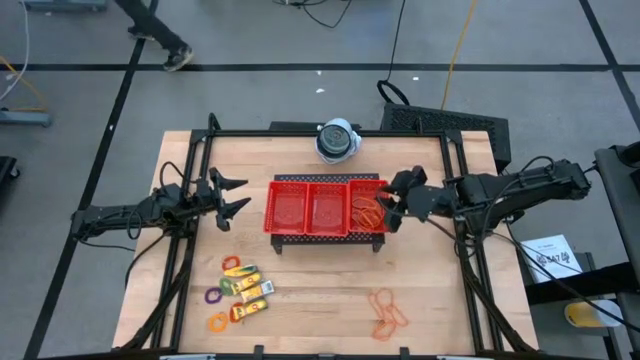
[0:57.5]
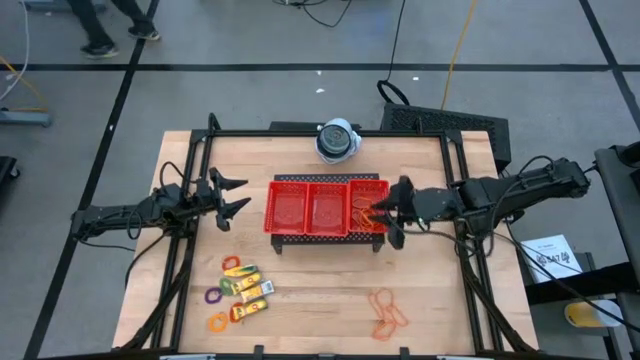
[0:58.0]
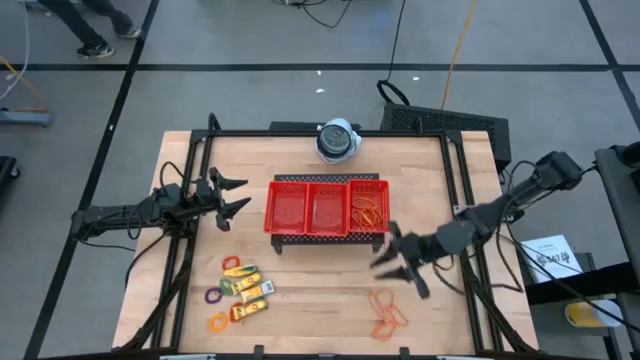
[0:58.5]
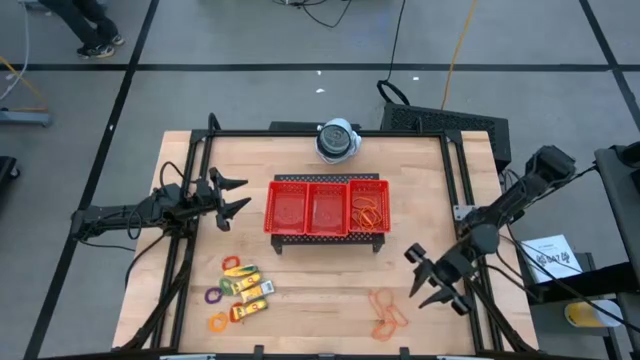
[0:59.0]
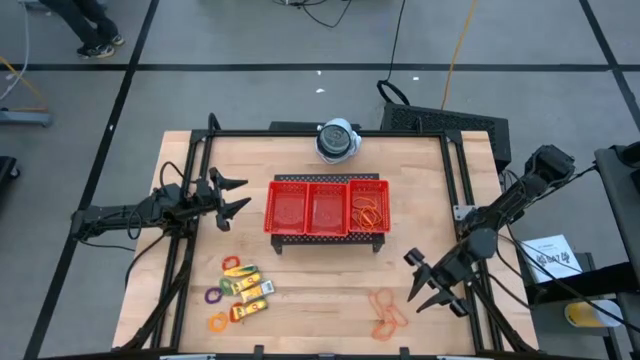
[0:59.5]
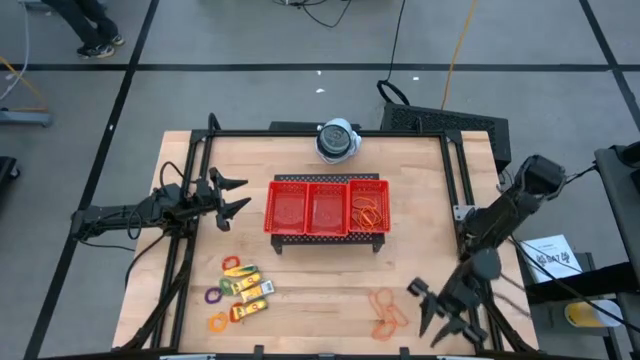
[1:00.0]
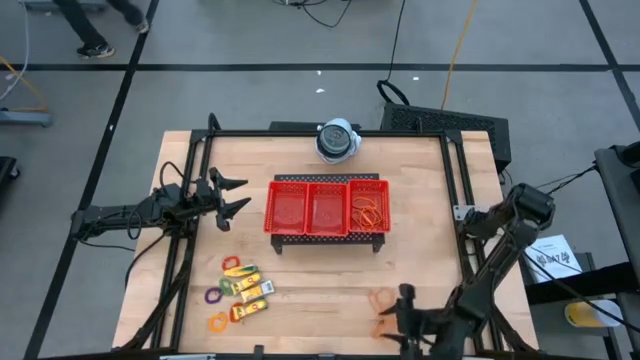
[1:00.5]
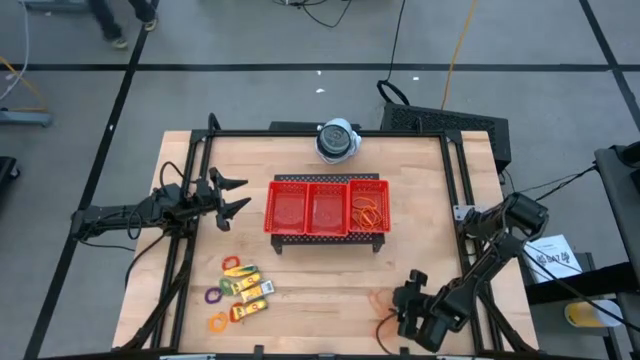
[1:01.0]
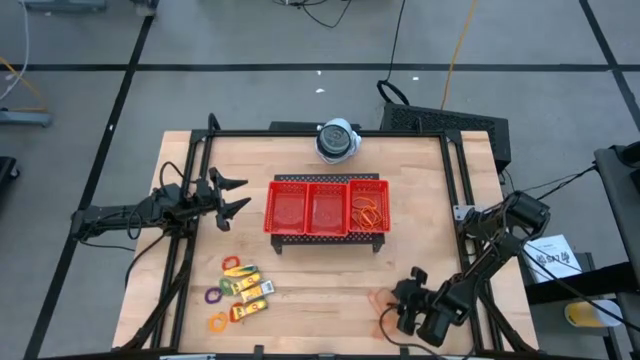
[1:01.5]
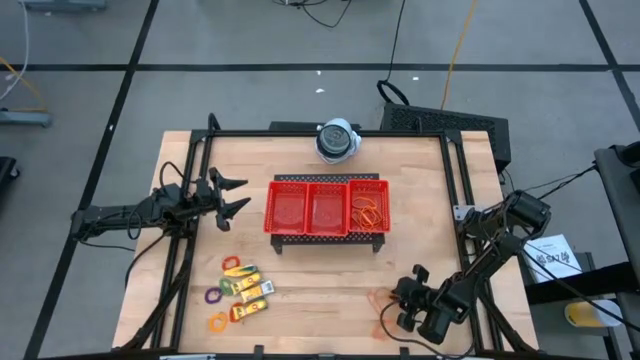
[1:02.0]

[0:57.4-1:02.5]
Task: Pick & Place Office Desk Supplies
Put the orange rubber band into the right red bin

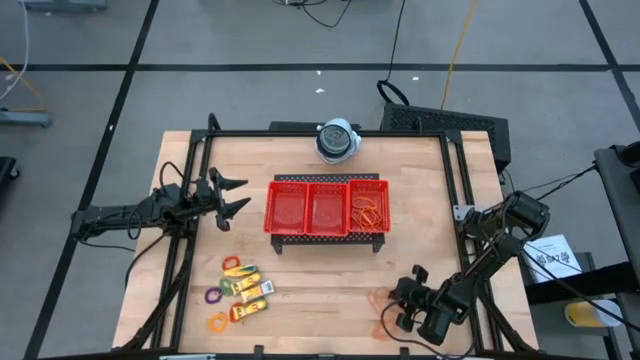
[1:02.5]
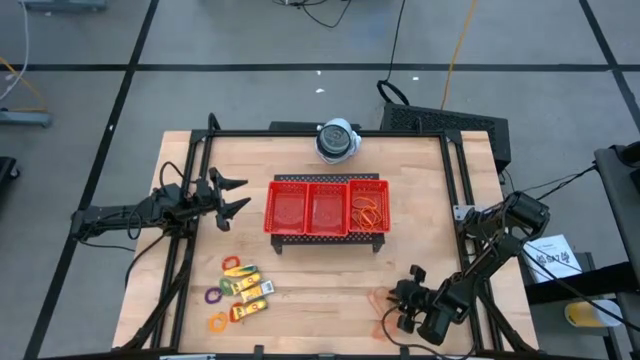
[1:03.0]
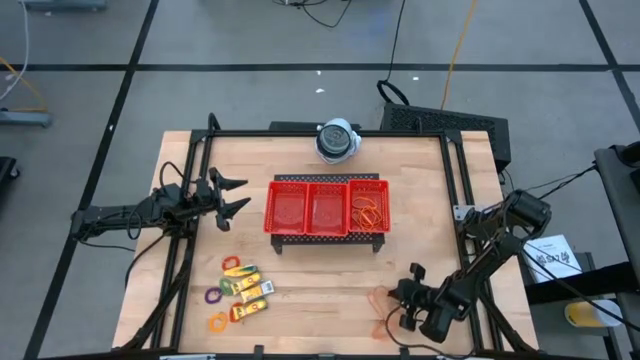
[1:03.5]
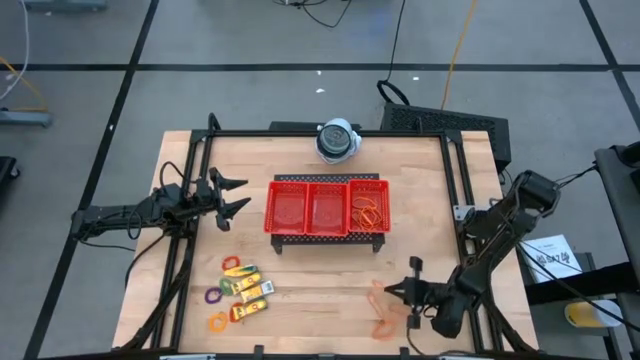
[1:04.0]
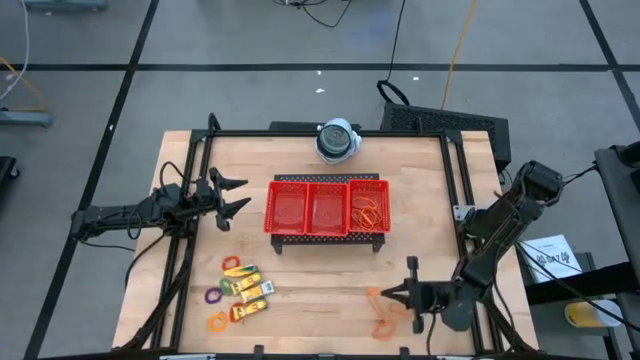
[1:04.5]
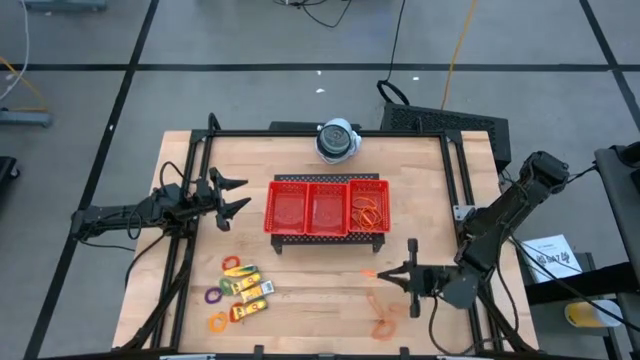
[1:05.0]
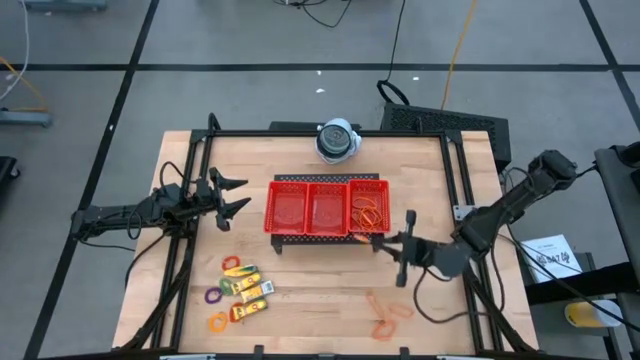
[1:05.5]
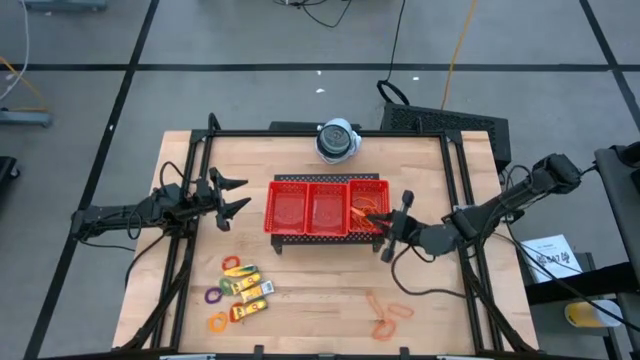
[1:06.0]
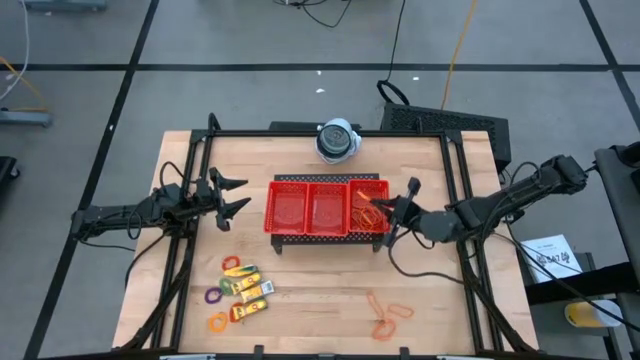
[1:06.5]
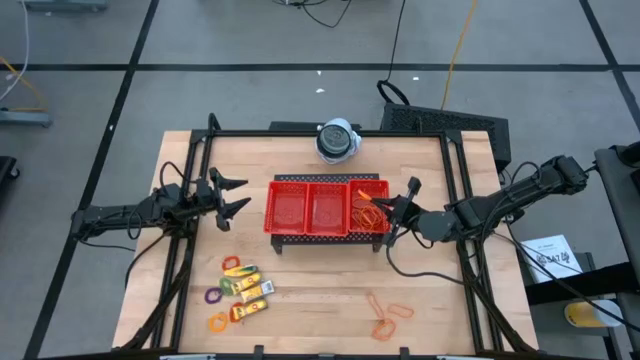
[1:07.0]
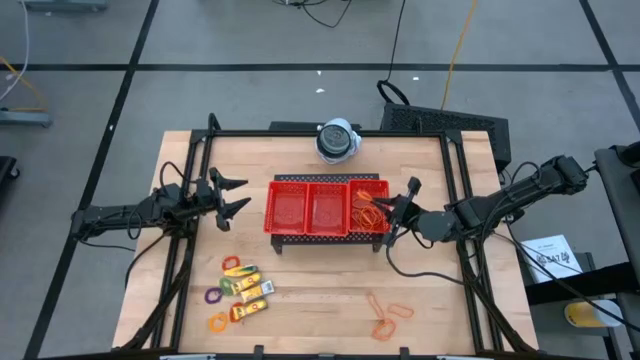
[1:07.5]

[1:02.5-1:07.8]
Put the orange rubber band into the right red bin

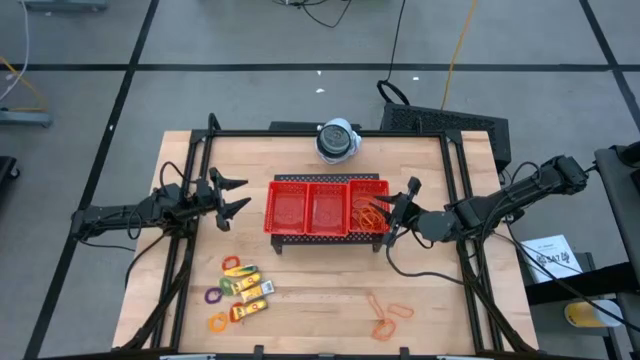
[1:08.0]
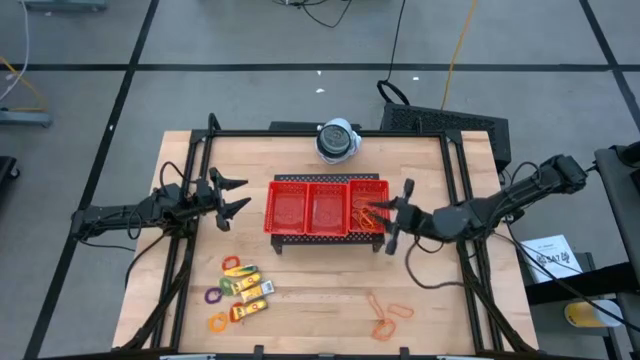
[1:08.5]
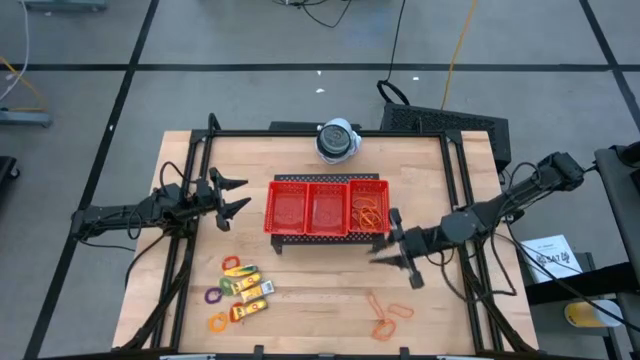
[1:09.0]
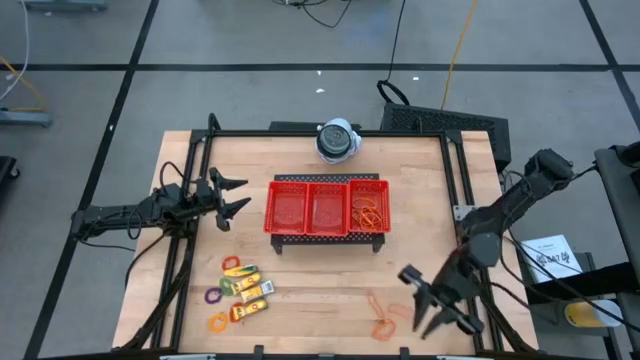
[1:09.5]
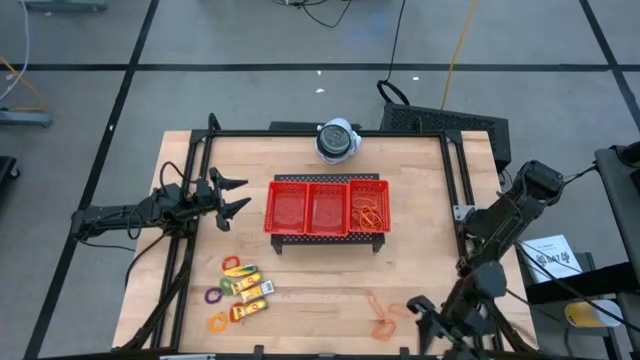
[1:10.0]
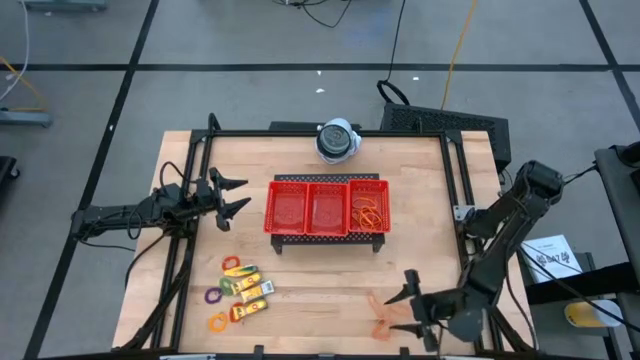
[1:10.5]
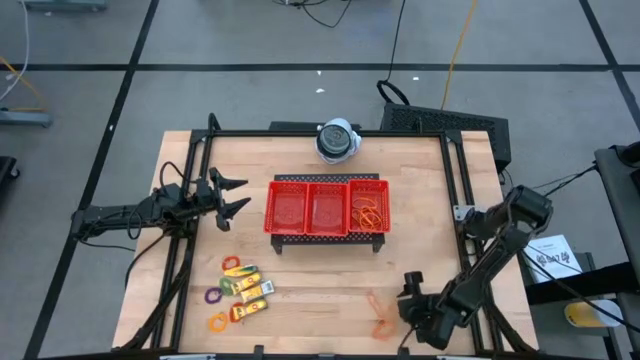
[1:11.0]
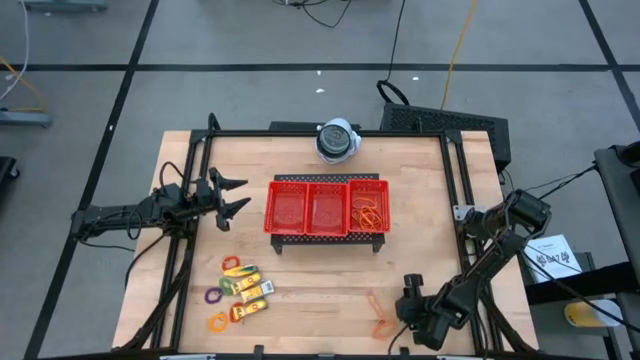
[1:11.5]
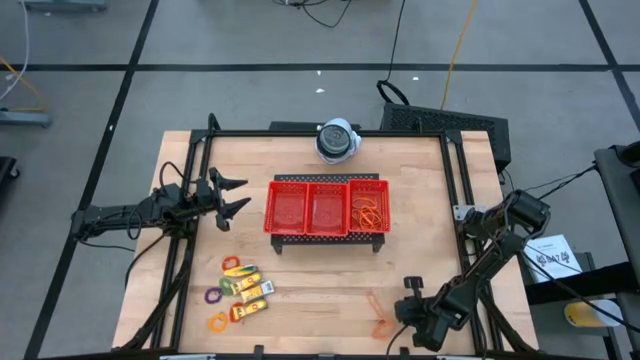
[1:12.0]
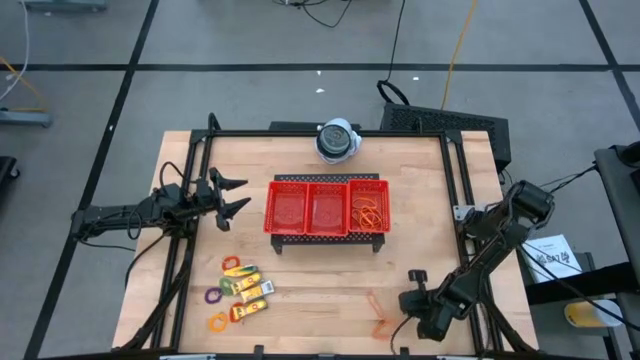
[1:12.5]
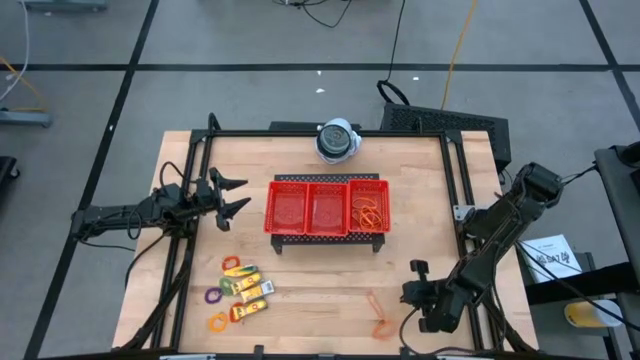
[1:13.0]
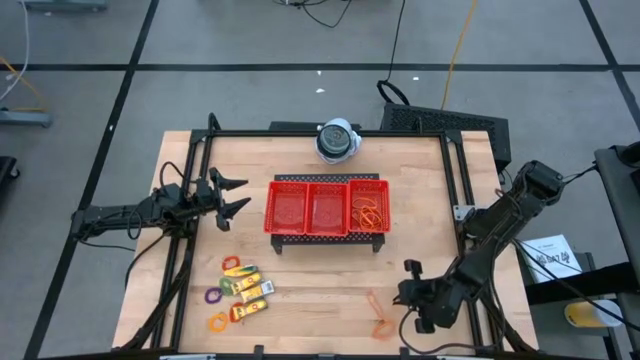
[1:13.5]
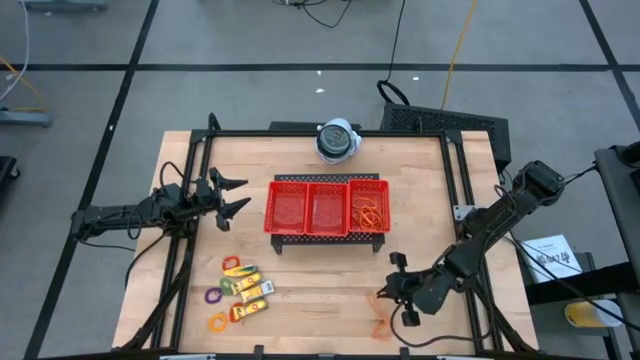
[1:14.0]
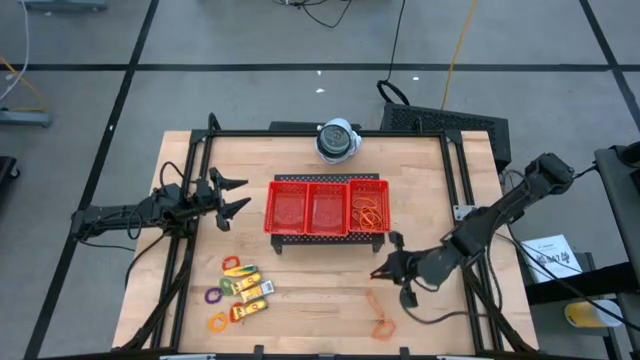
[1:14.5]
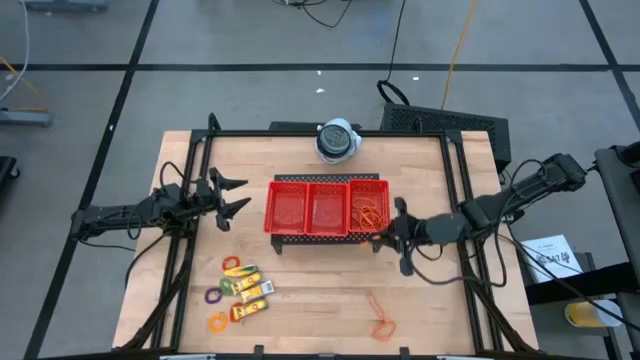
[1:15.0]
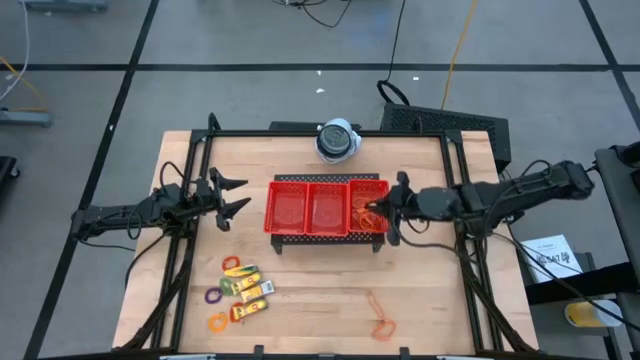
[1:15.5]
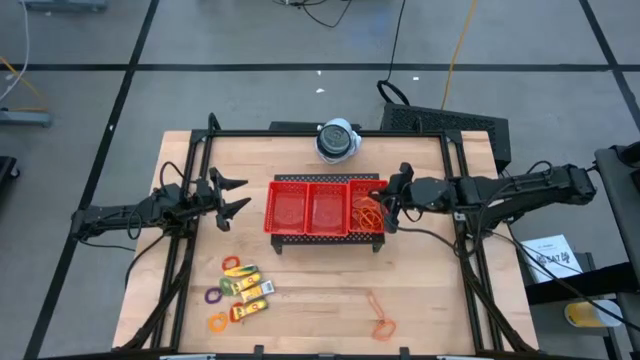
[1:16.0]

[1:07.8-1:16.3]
Put the orange rubber band into the right red bin

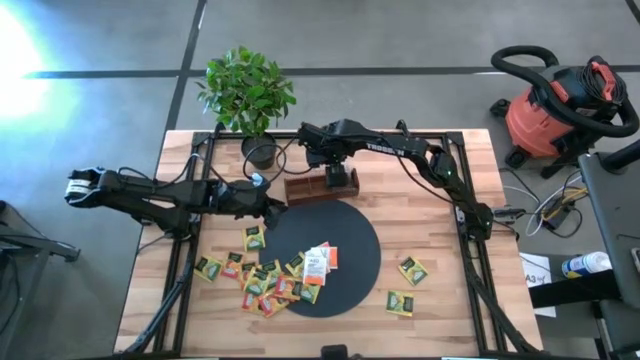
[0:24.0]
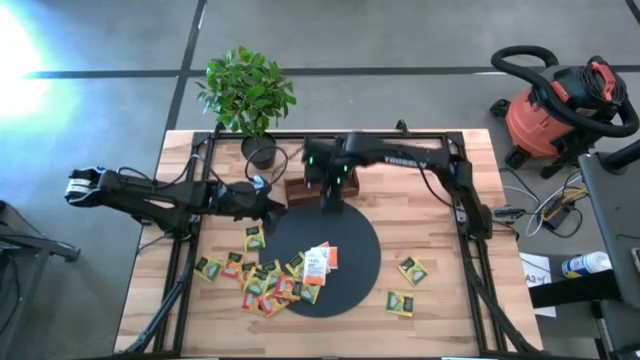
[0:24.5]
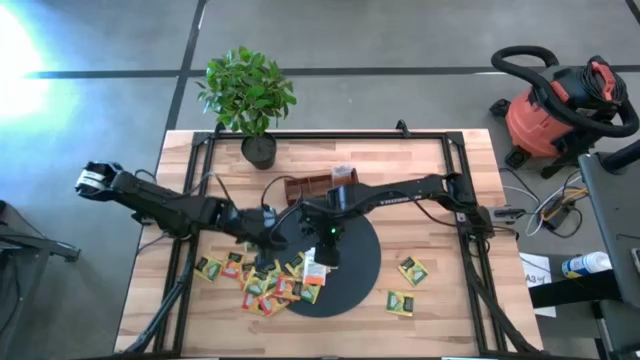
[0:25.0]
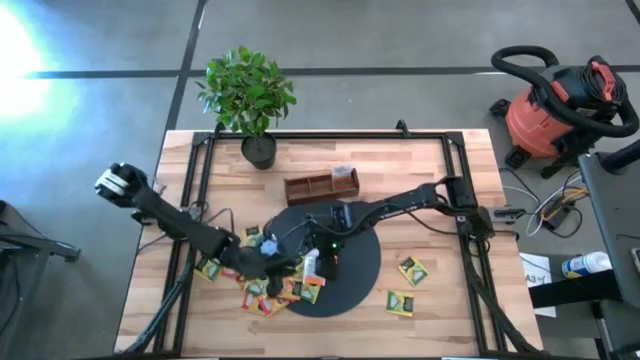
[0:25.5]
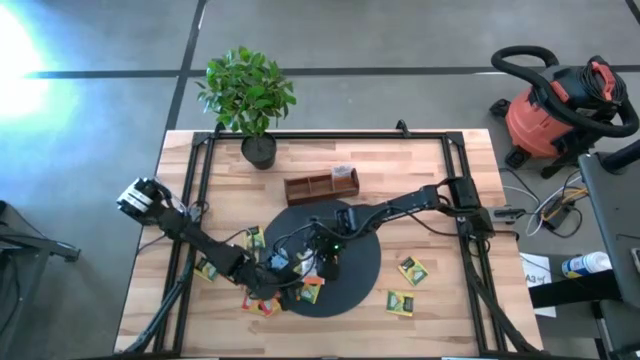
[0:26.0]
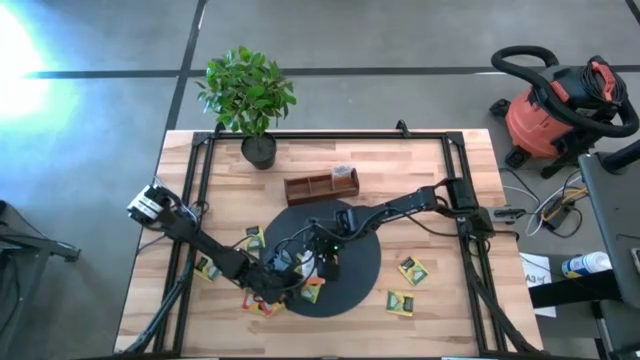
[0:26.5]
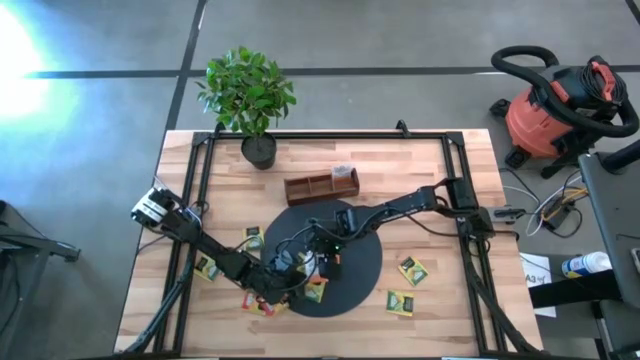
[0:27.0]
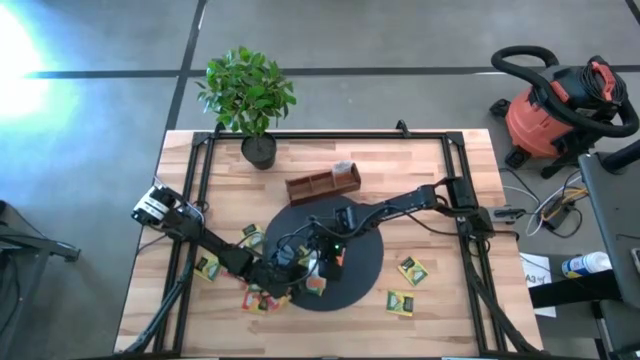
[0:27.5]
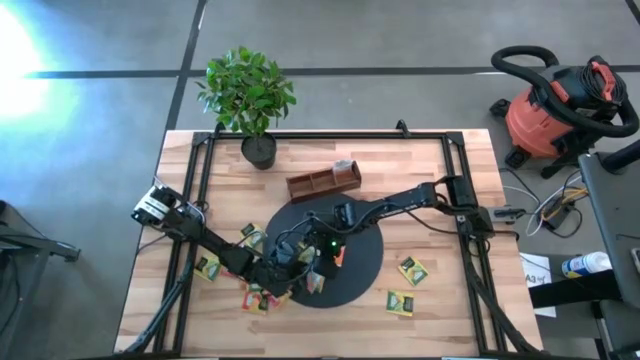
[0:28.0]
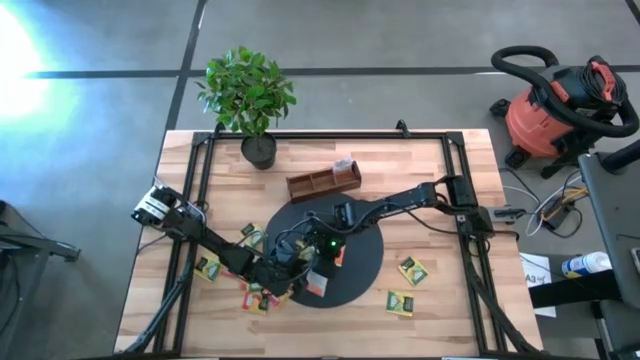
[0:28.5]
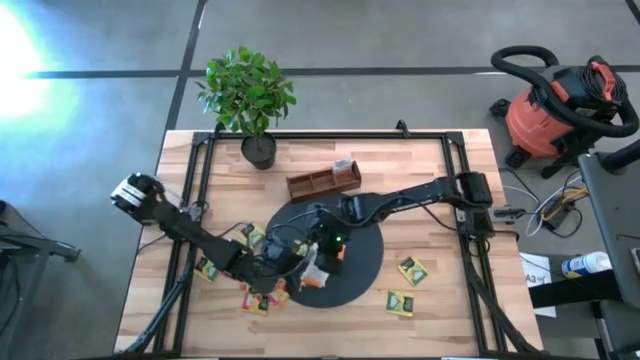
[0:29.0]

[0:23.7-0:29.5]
Task: Pick & Place Tea
Put the white tea bag into the right slot of the wooden organizer
